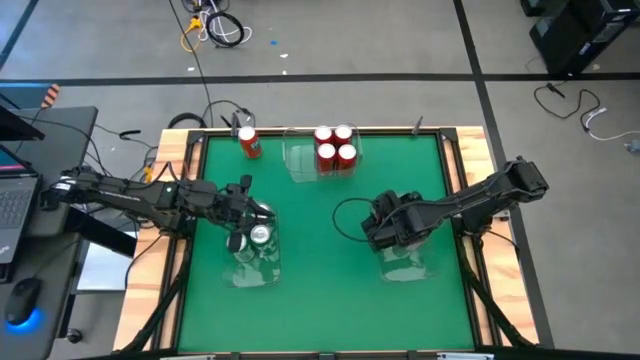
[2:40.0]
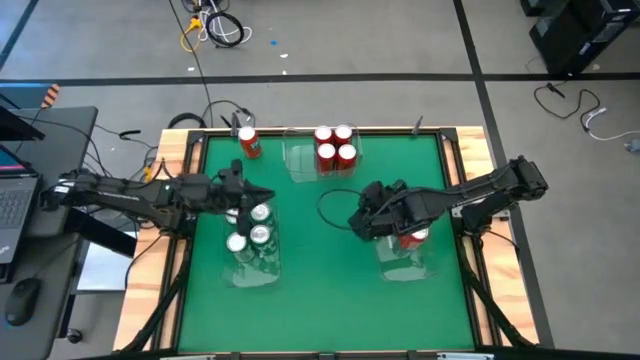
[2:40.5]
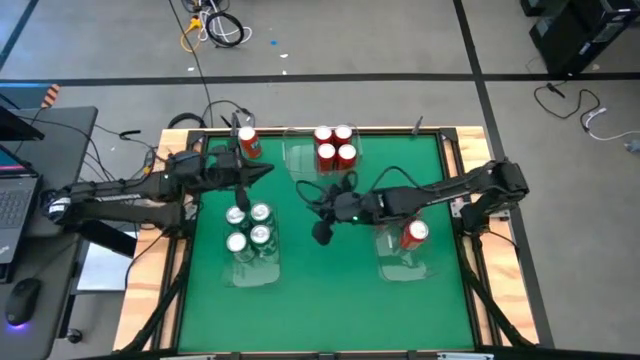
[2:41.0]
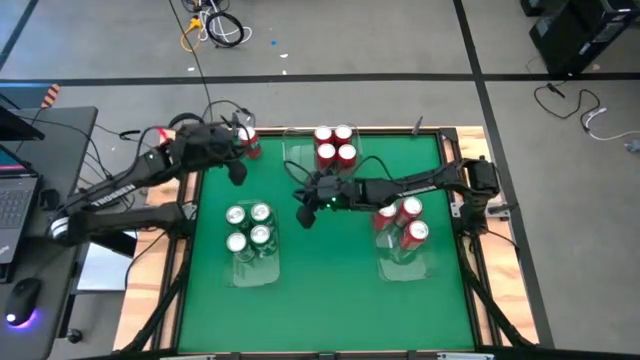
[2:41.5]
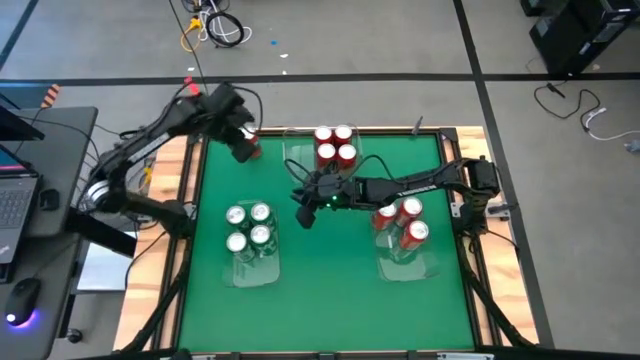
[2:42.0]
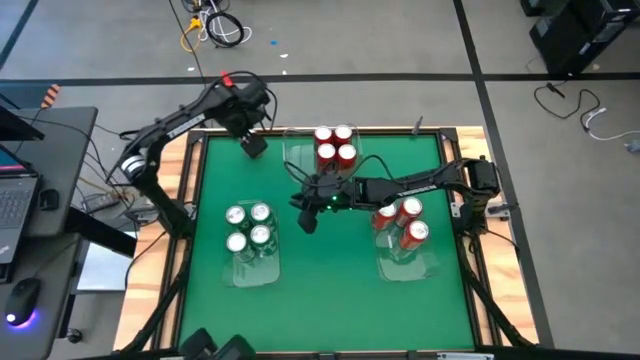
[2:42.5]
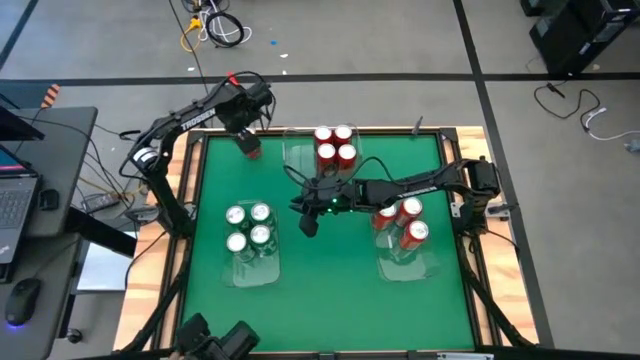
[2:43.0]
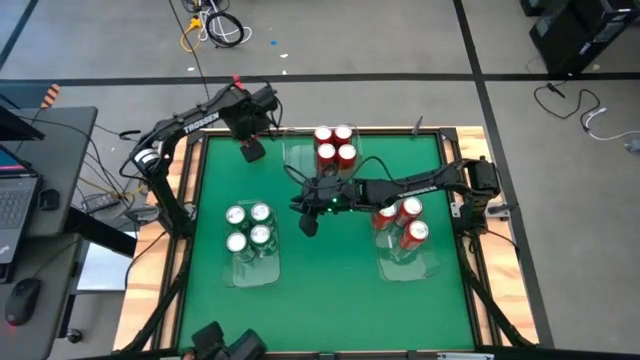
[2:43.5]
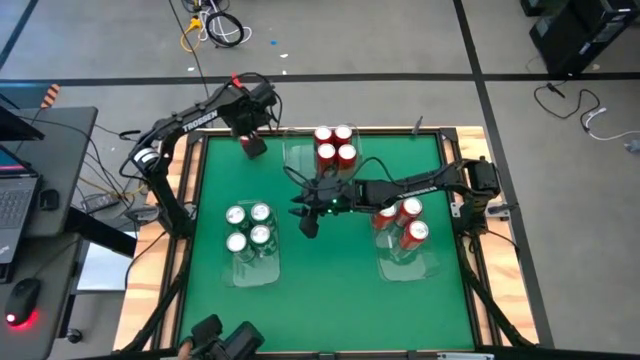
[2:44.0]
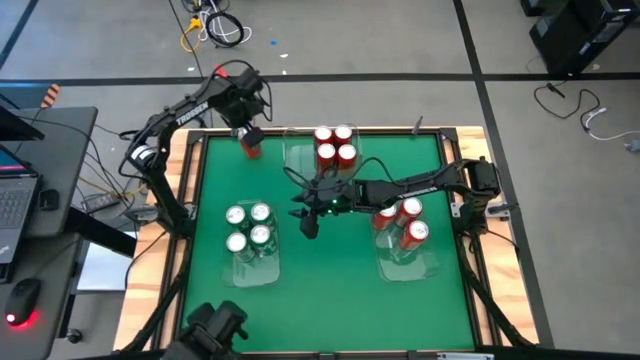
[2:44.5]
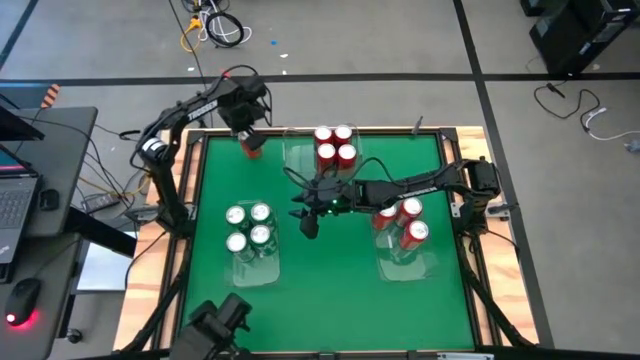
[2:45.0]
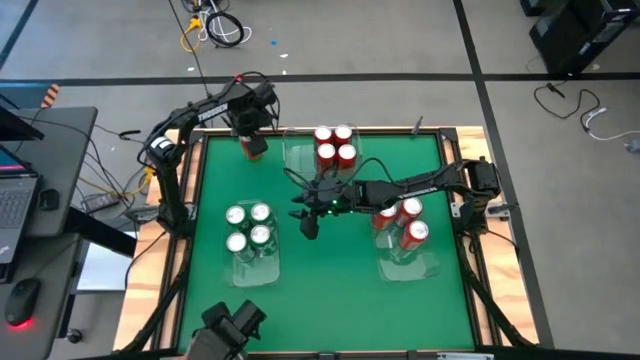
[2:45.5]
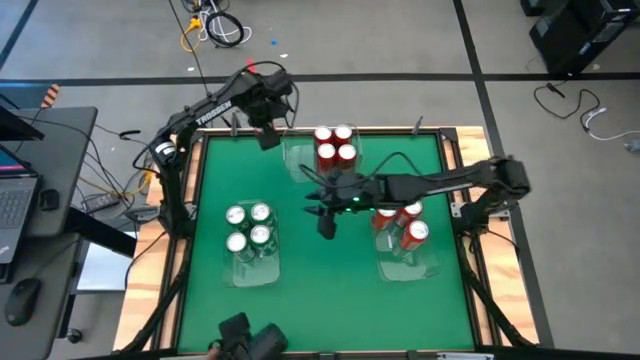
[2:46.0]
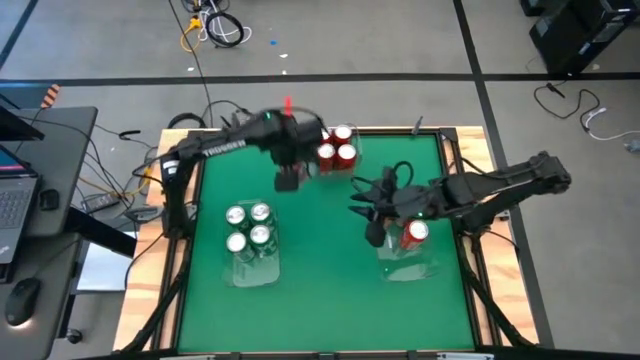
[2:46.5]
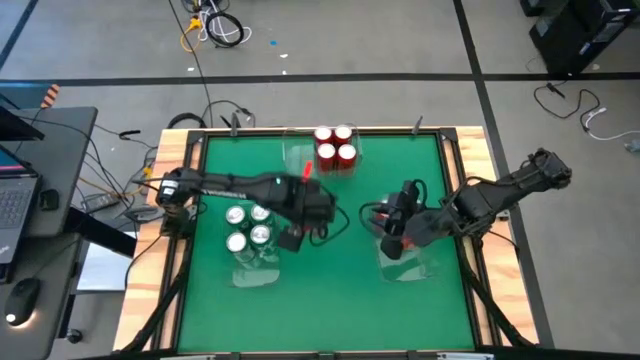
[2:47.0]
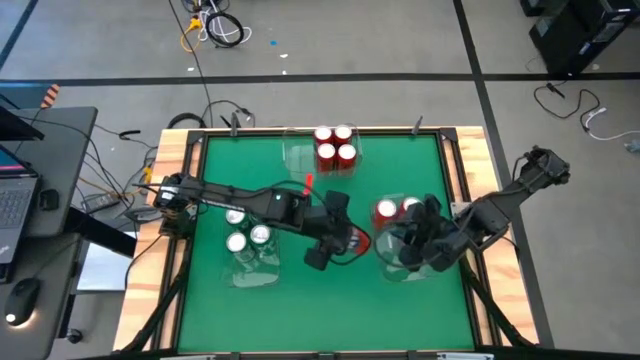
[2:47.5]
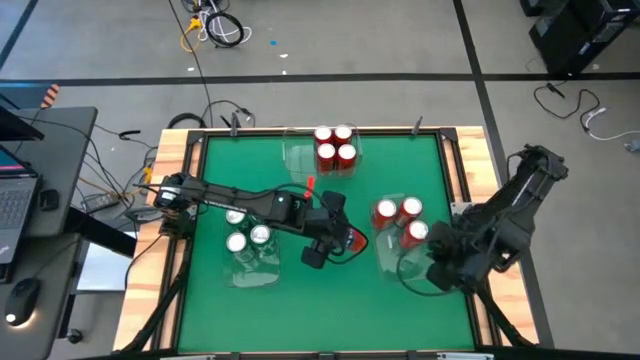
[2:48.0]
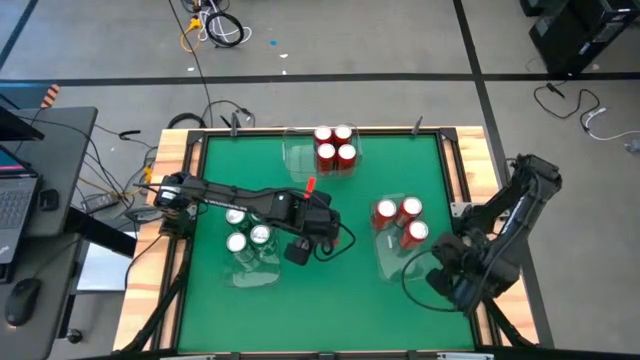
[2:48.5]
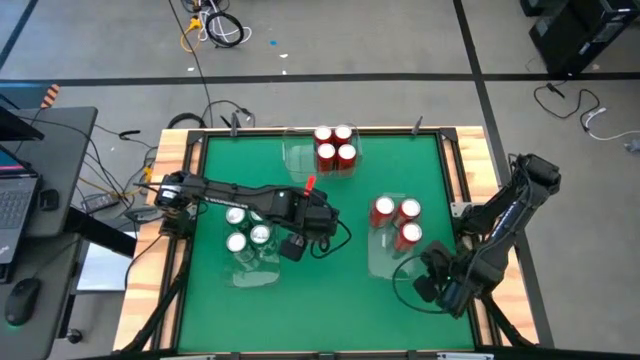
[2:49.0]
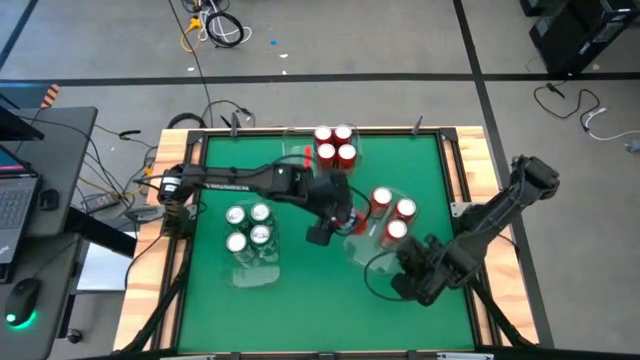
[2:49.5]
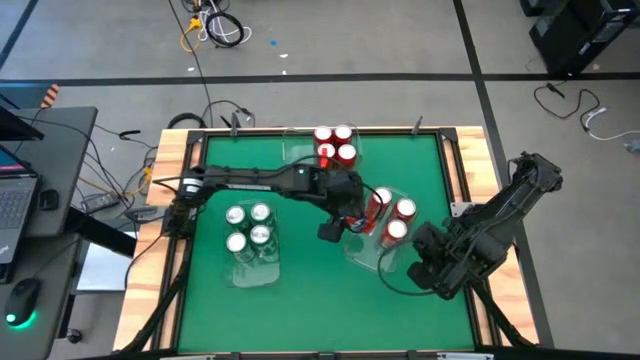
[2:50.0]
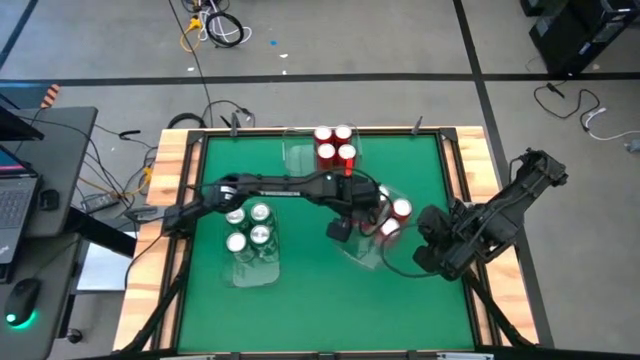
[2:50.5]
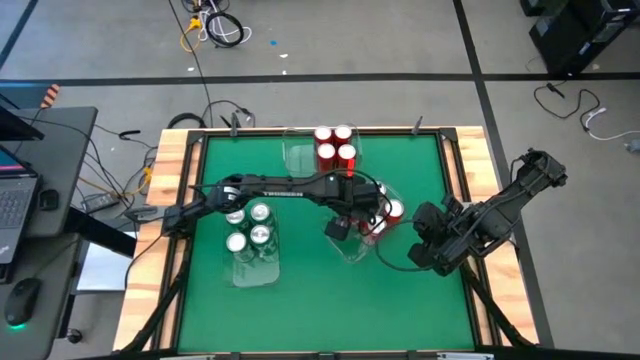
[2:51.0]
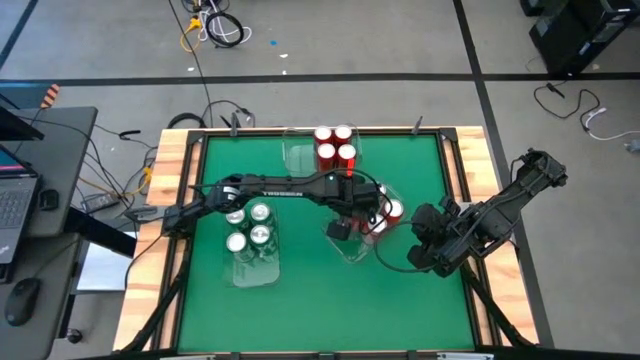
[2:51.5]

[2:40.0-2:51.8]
Task: Sort soda cans
Put the red soda can into the middle right transparent bin

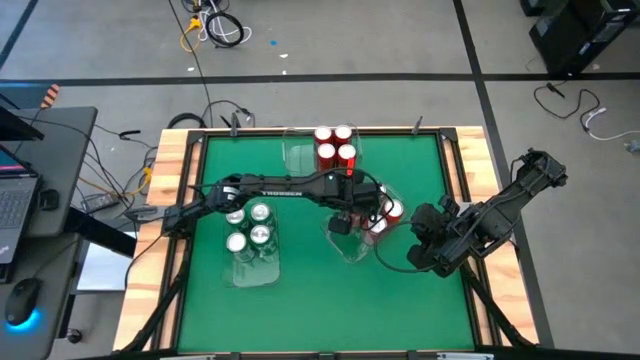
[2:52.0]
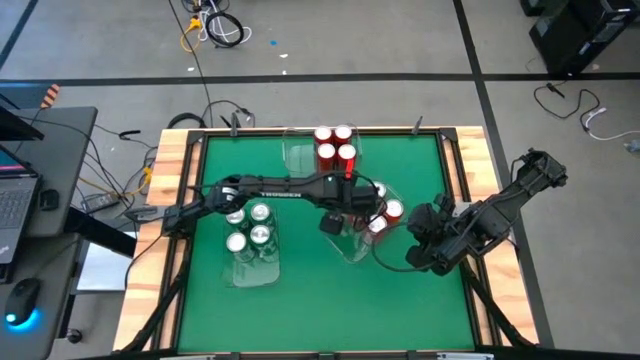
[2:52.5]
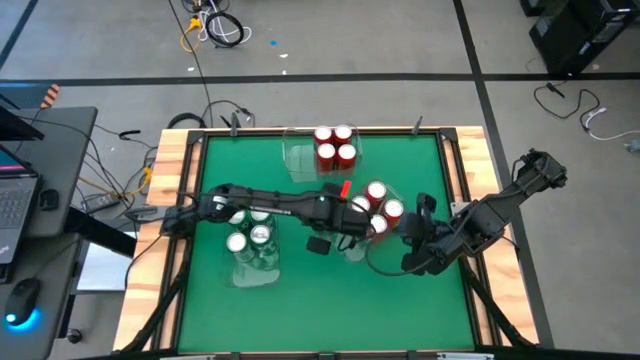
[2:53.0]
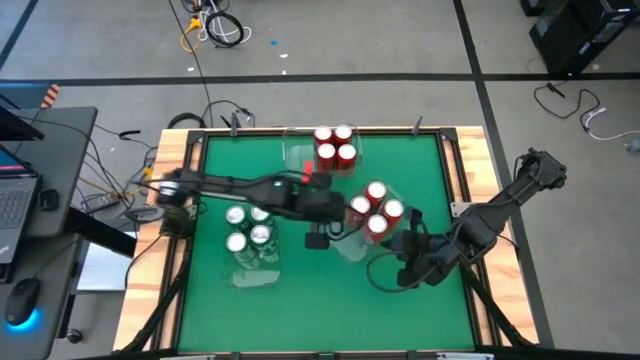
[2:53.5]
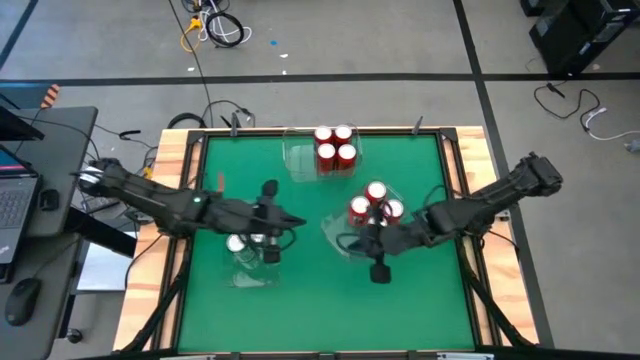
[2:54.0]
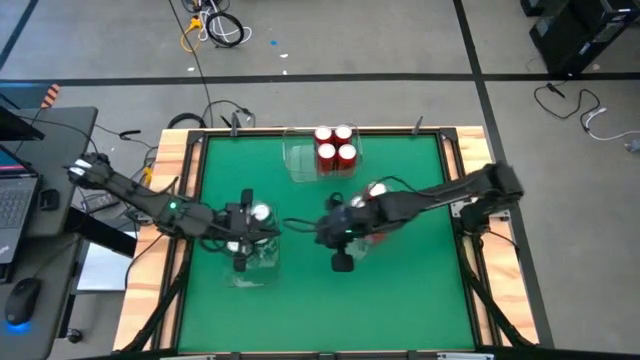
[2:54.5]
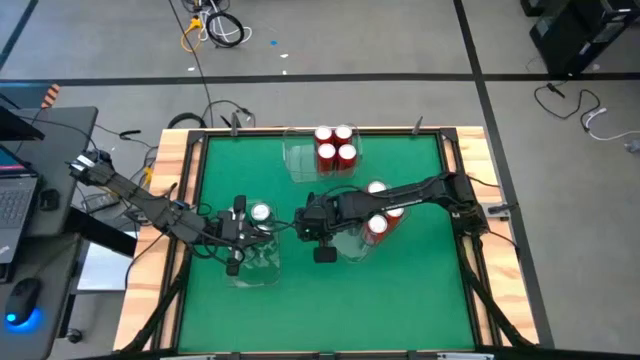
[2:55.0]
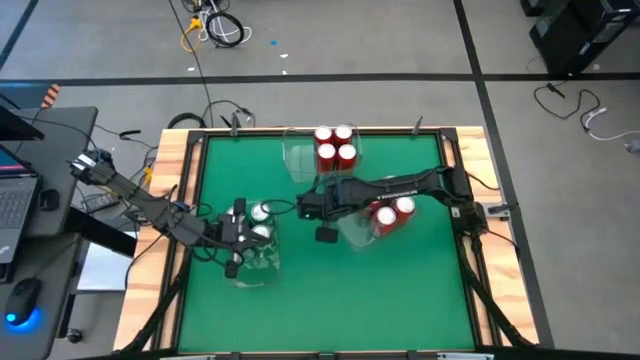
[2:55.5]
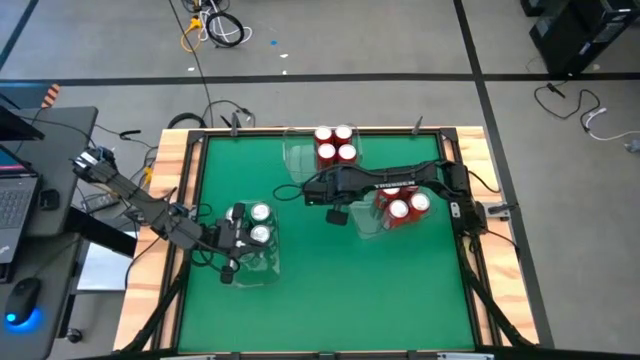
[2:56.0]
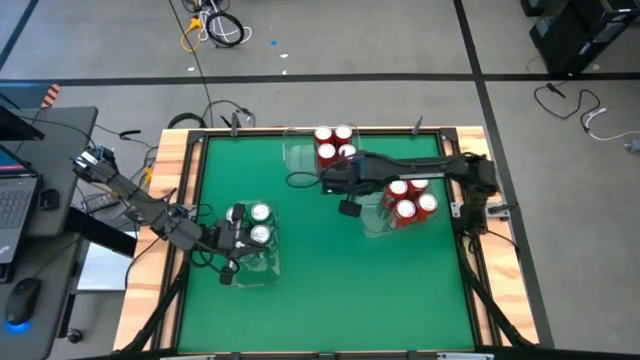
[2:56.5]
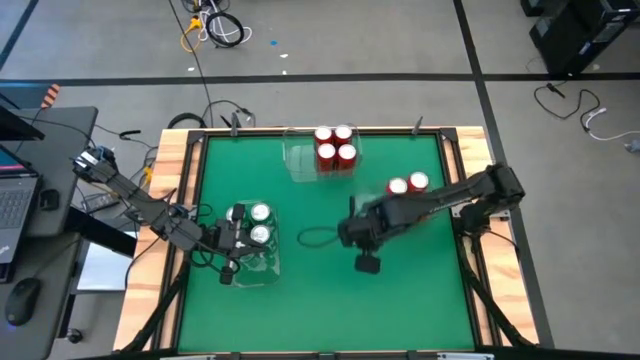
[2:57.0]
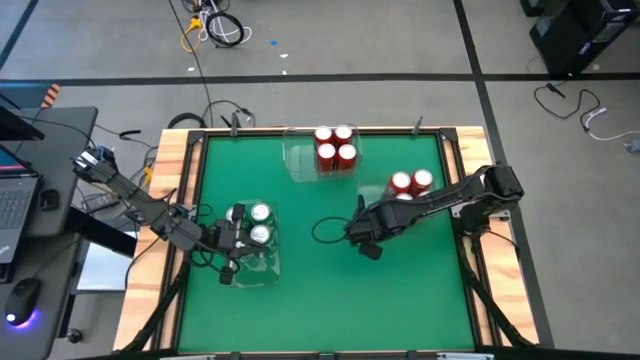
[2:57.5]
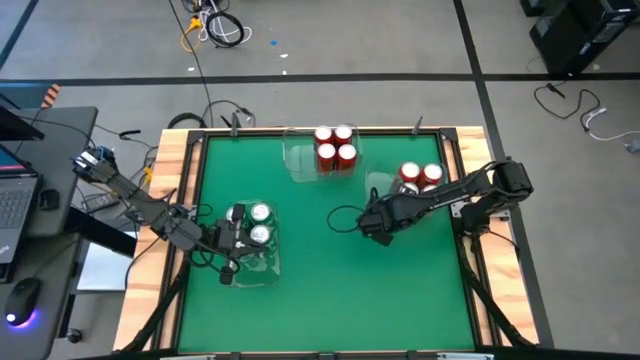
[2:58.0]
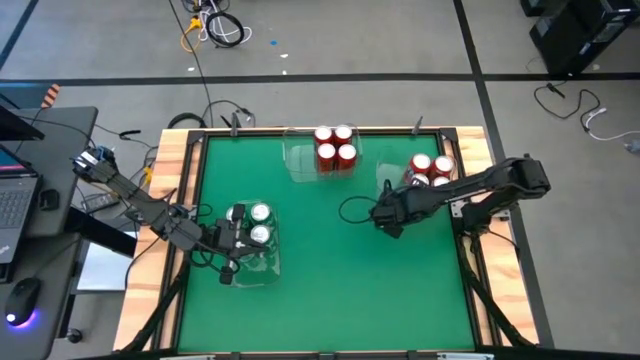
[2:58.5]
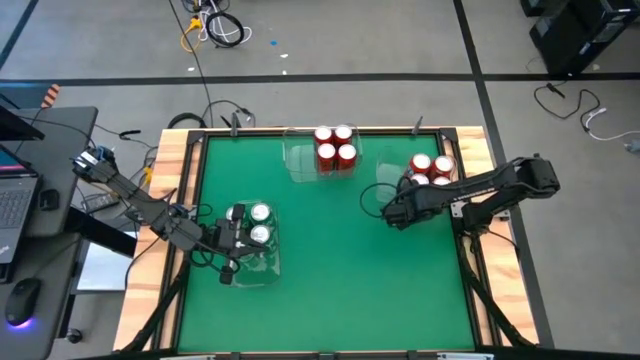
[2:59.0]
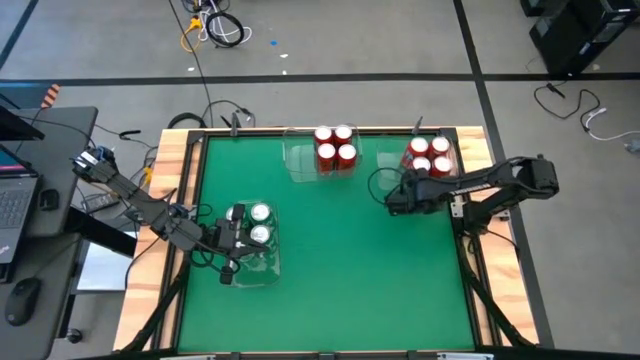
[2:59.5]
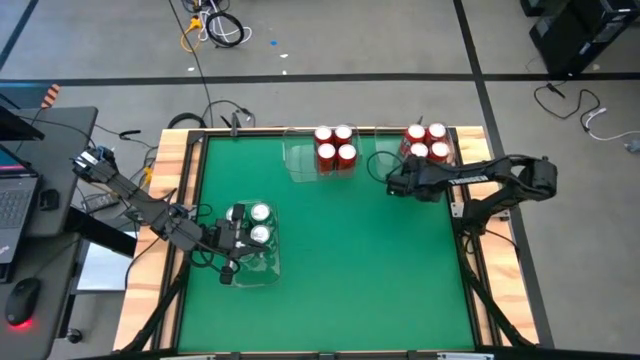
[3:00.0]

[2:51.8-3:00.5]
Move the right transparent bin to the right side of the center transparent bin
